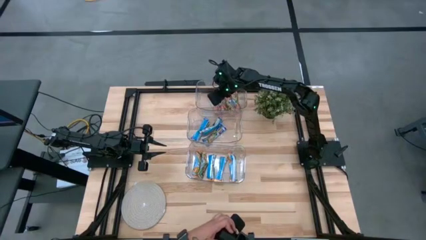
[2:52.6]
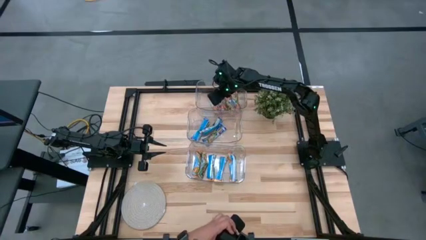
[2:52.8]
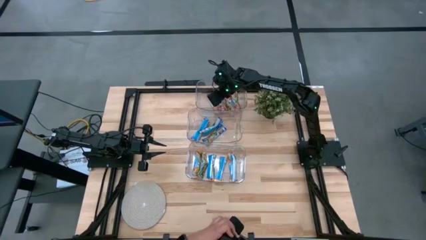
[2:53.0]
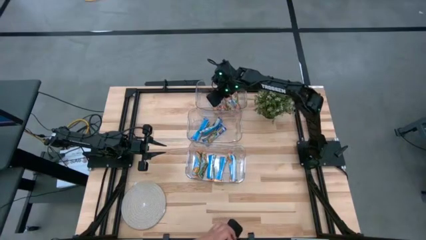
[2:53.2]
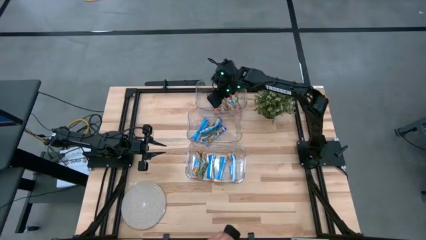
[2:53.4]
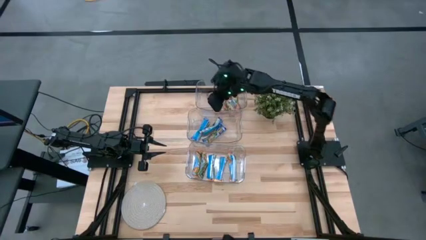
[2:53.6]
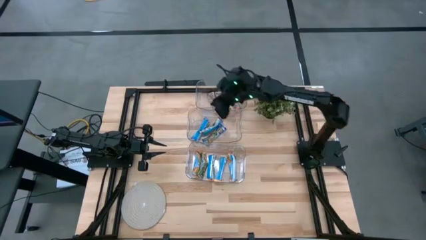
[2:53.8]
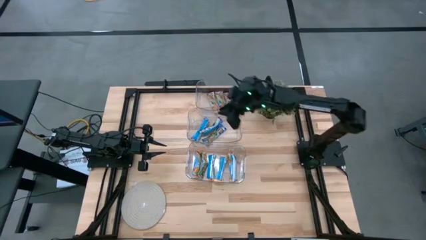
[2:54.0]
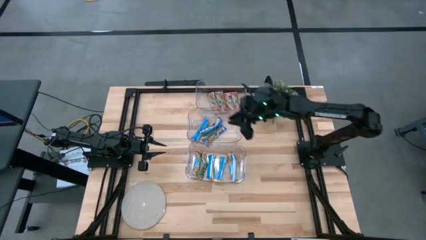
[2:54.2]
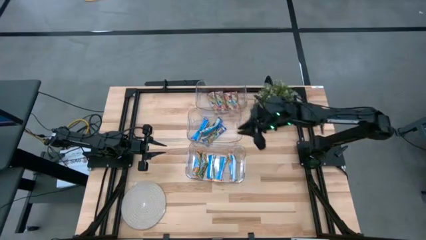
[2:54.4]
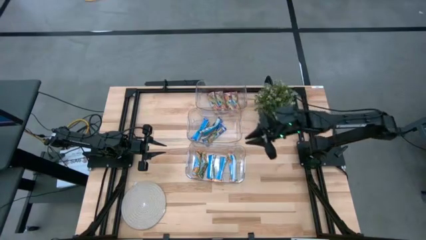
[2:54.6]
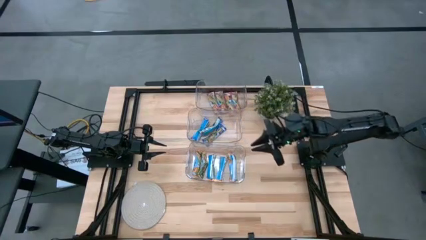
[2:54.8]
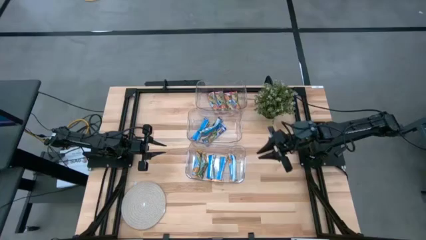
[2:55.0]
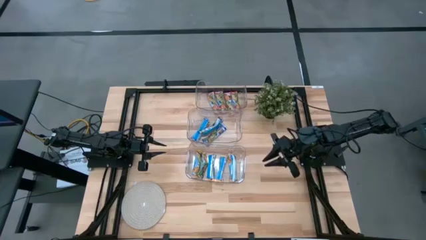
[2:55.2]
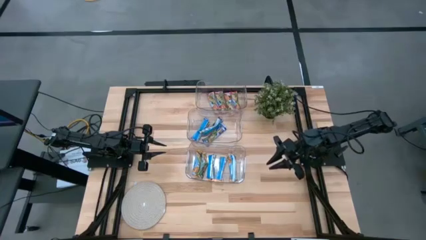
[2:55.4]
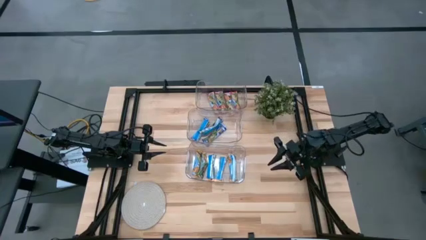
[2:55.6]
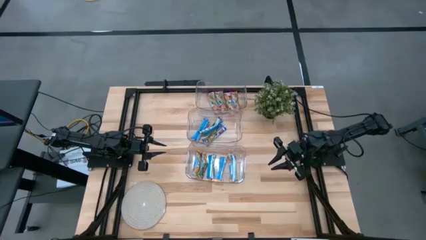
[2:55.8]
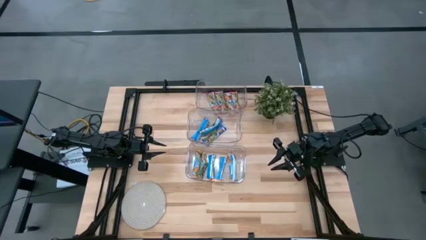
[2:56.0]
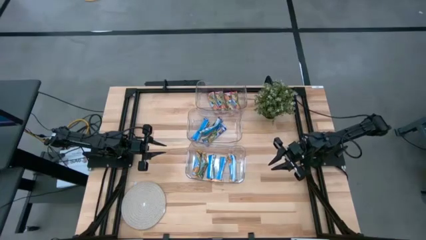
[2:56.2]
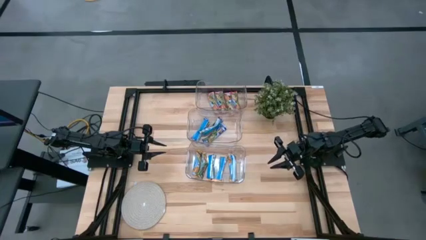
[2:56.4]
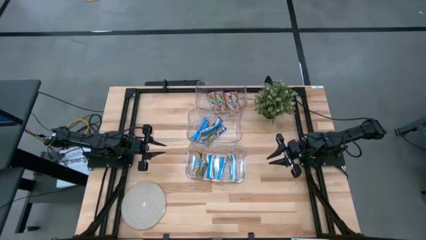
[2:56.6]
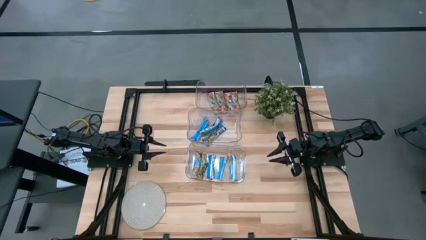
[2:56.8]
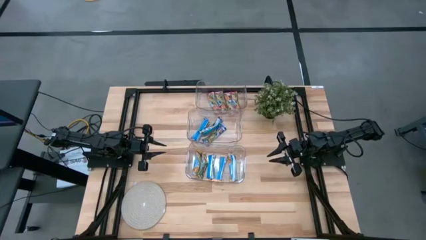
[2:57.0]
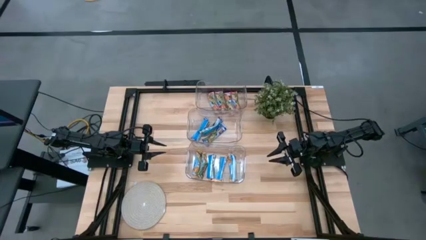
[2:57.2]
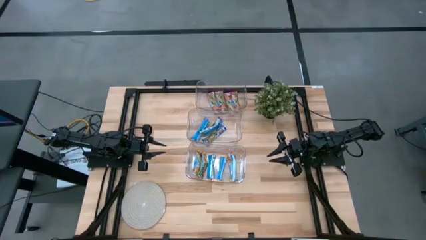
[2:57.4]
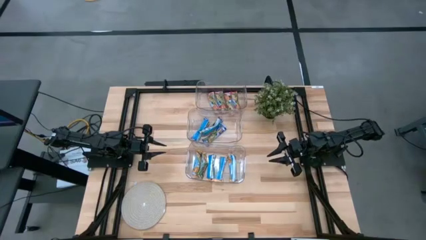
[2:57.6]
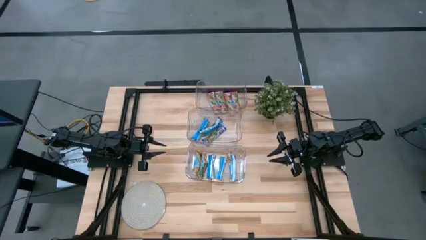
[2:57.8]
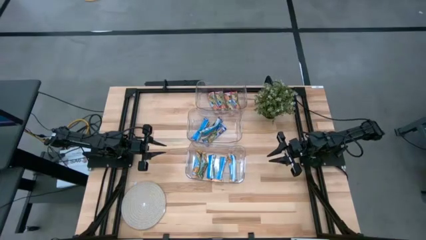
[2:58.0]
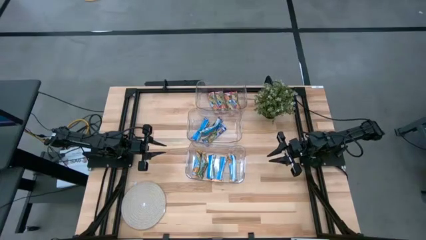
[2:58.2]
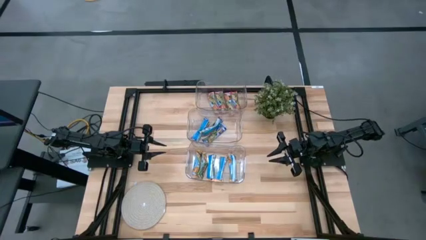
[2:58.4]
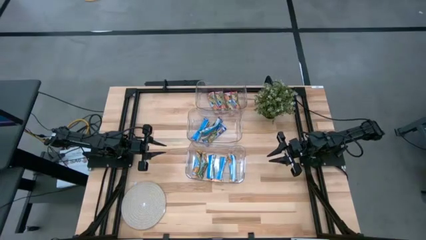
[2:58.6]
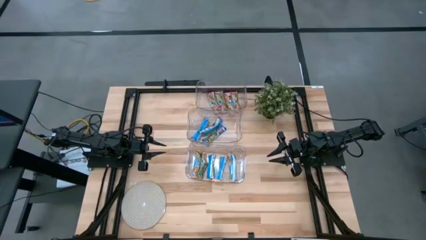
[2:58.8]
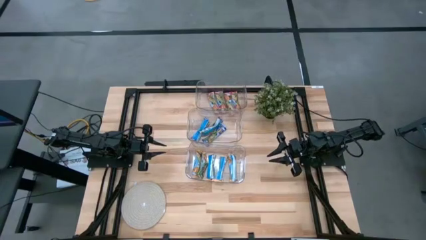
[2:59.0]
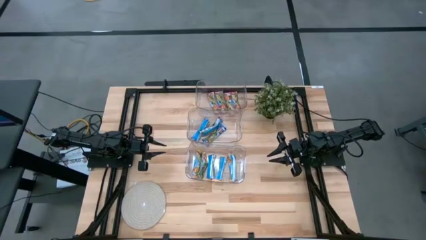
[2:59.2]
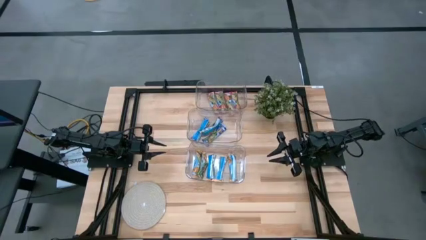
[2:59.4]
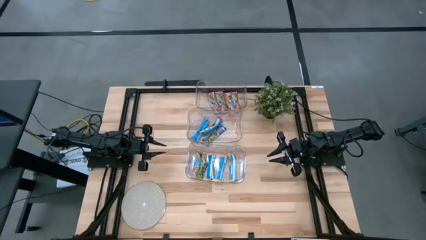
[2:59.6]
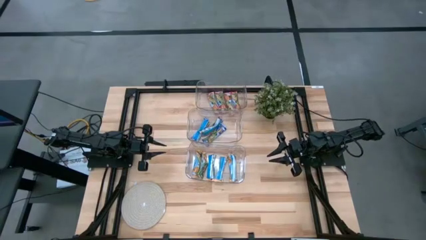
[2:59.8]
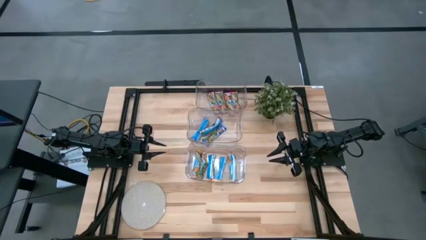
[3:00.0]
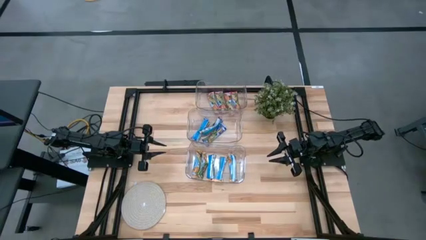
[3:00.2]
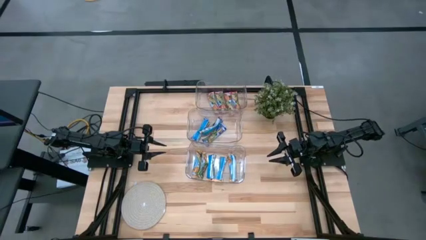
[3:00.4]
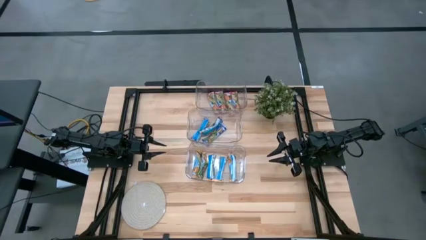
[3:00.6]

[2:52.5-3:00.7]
Task: Pick and place Granola Bars by type
Return to Home Position

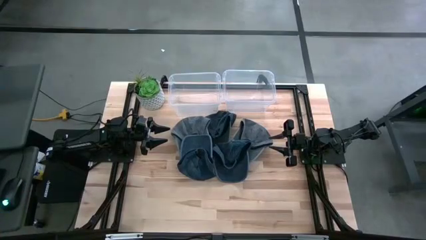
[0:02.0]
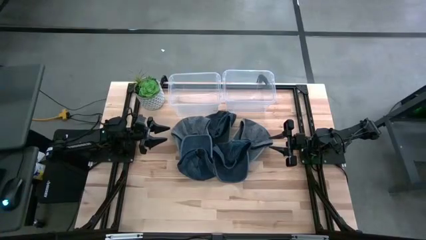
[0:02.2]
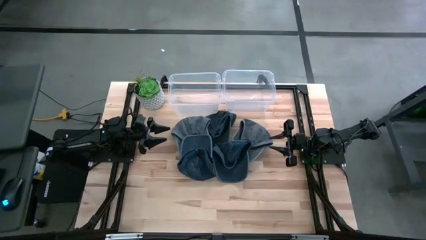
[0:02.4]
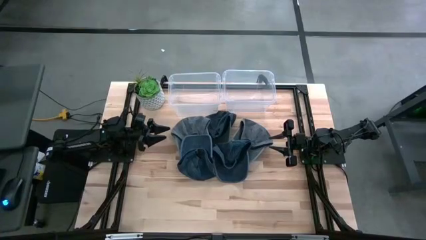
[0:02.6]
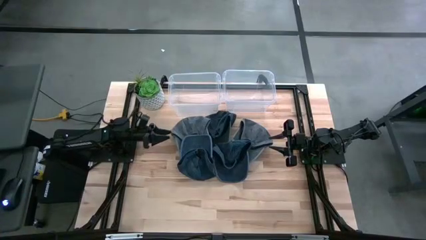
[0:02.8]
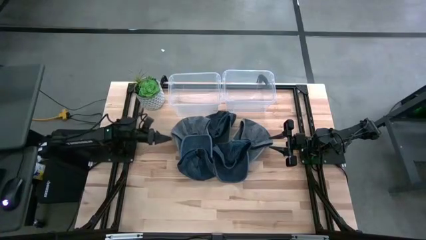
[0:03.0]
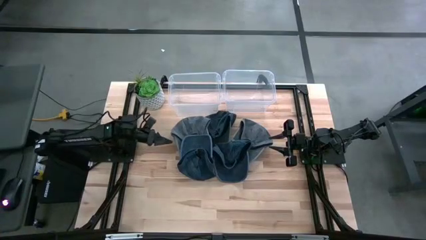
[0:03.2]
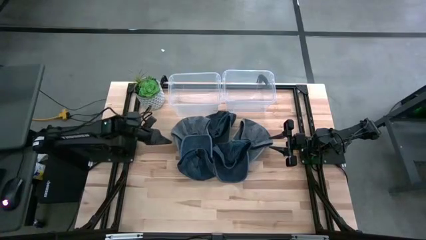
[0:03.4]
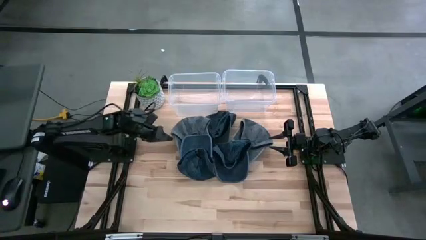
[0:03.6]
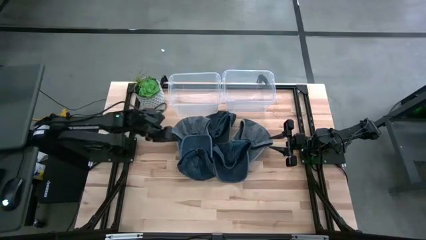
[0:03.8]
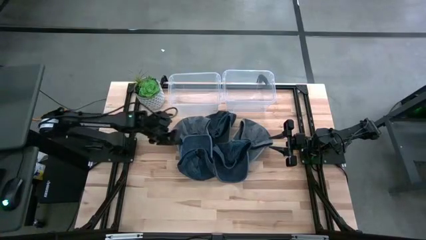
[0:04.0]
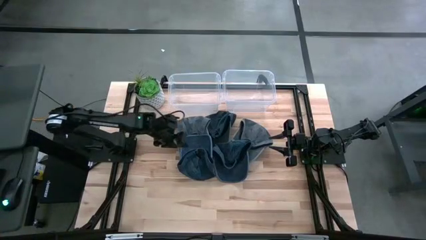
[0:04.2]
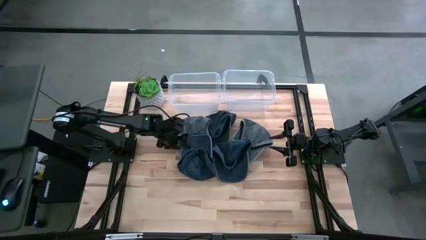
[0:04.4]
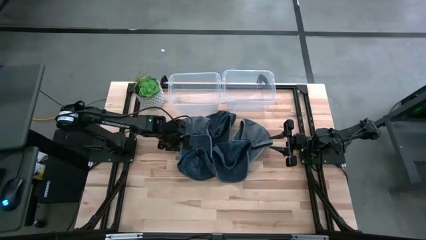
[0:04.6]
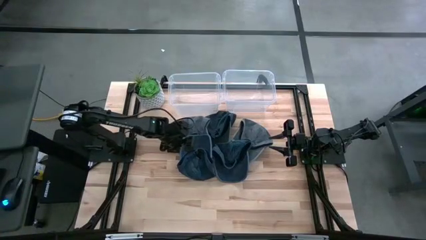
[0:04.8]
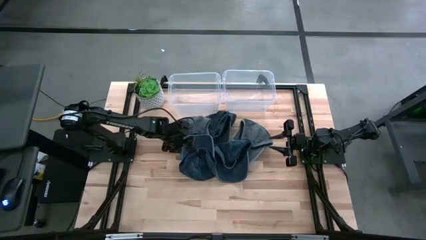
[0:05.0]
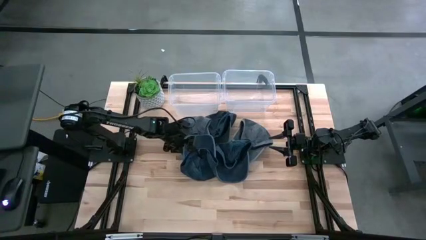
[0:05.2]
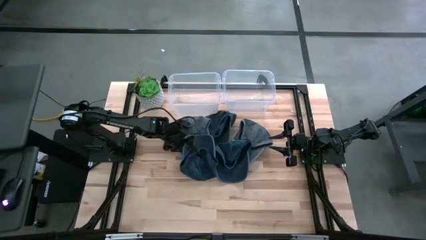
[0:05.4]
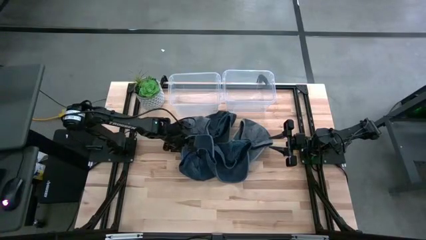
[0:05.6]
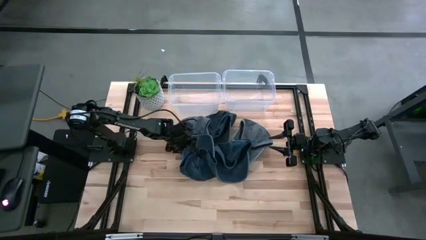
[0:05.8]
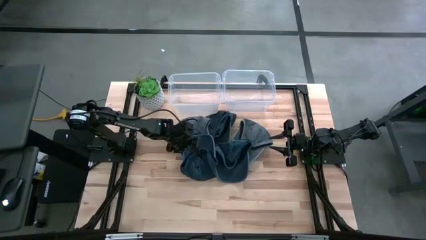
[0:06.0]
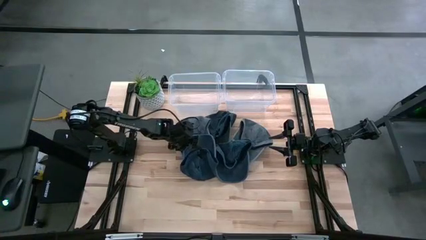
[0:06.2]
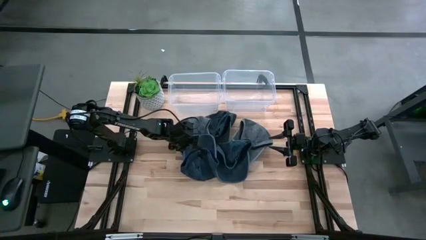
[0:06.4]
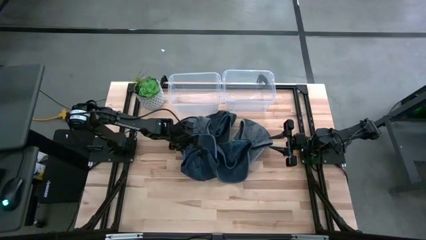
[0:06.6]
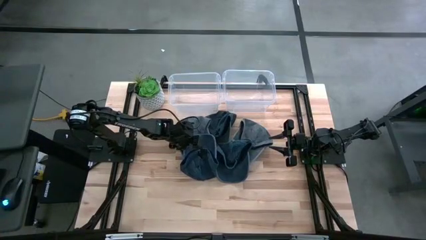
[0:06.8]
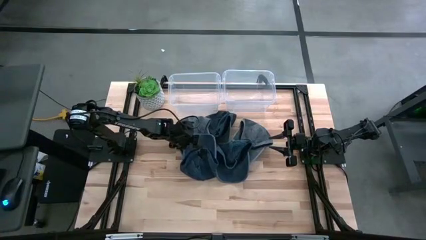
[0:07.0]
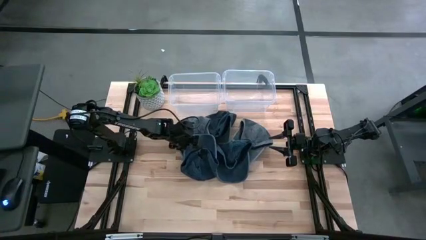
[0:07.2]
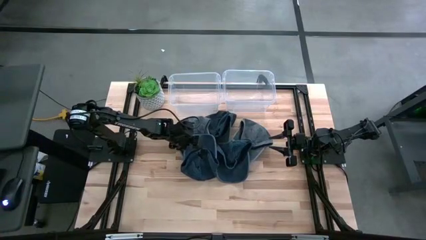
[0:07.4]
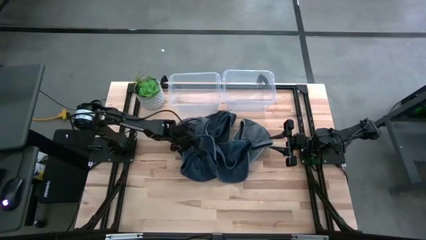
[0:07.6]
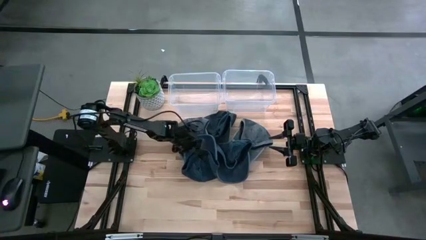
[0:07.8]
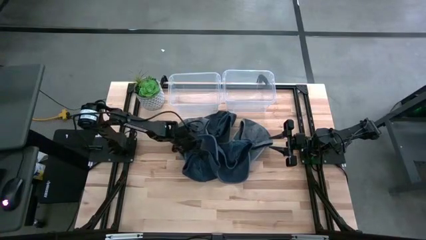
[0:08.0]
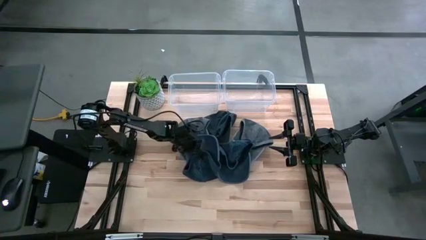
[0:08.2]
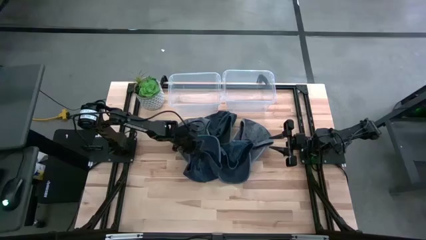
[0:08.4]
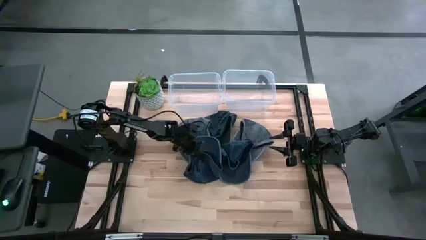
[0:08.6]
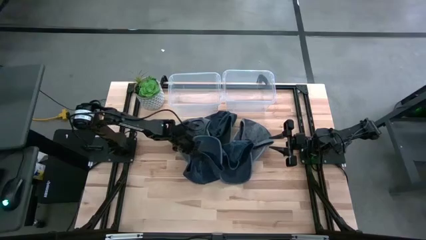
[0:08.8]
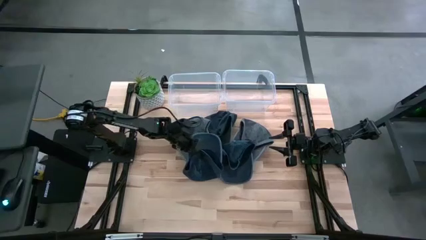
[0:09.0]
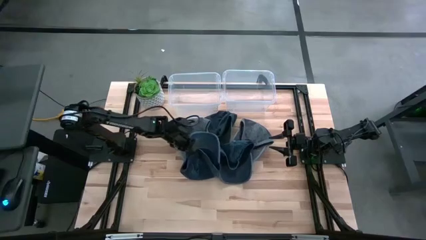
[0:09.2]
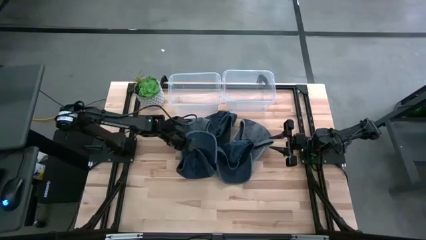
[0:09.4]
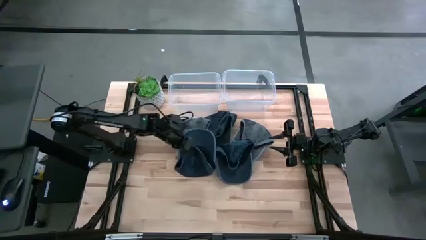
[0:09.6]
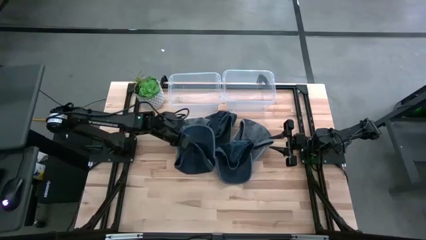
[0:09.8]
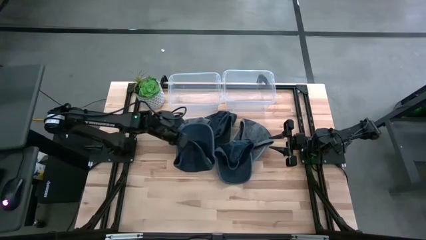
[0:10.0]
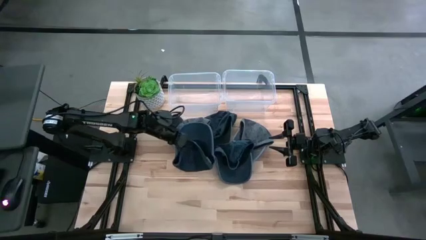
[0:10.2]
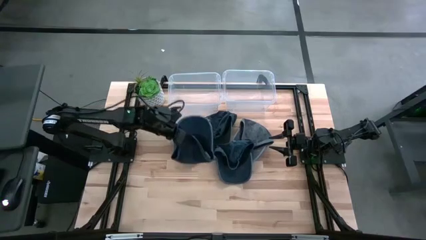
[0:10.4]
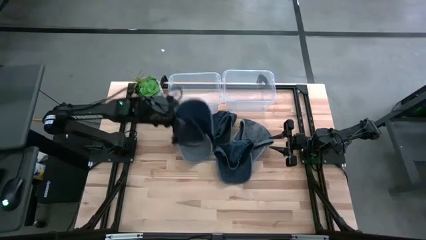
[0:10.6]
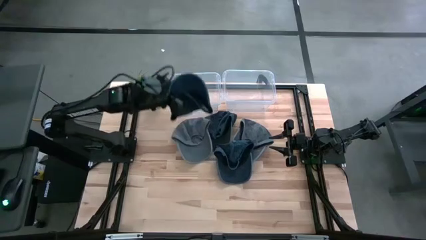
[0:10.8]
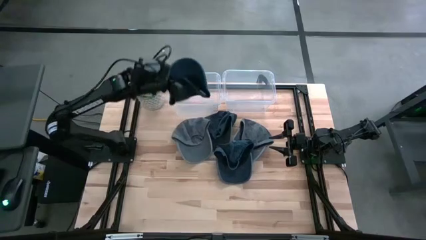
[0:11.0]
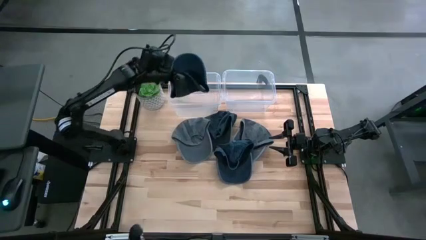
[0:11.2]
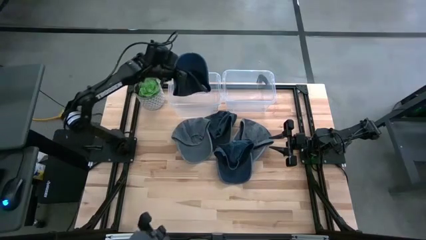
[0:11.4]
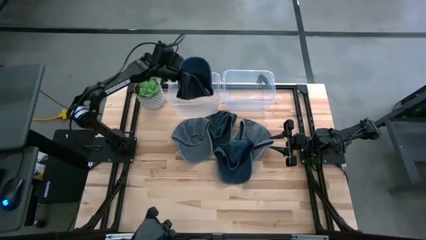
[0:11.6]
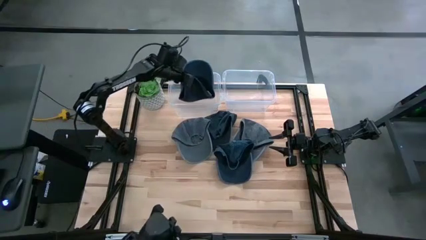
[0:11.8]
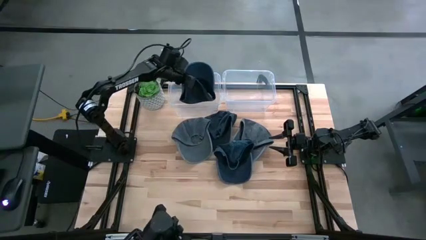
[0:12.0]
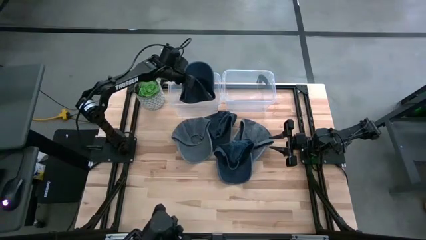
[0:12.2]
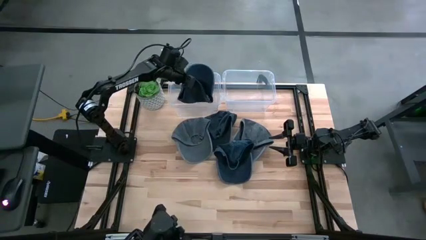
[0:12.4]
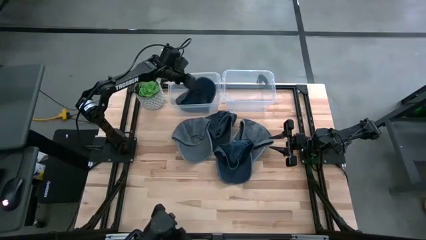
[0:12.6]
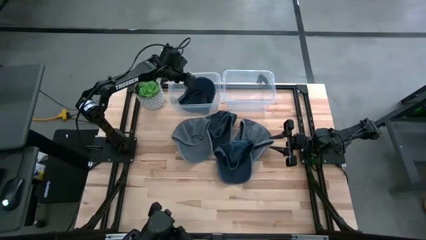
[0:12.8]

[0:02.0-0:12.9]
Task: Pick & Place hat
Put the bottom left dark blue cap into the left transparent bin
